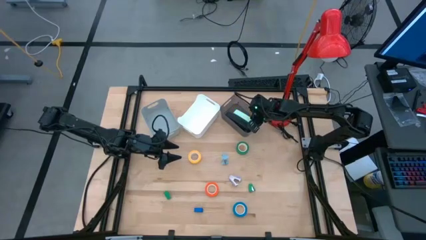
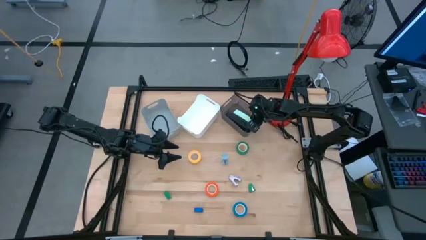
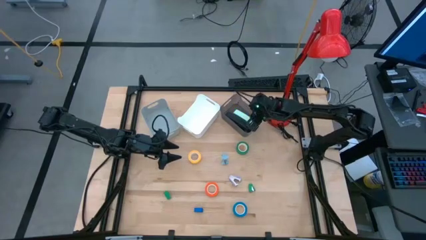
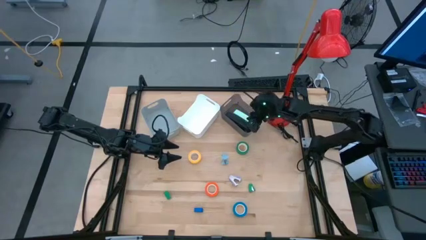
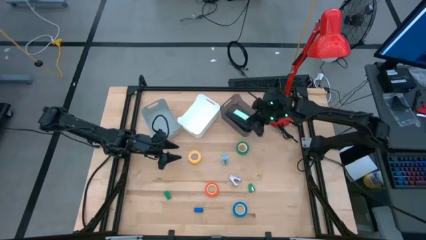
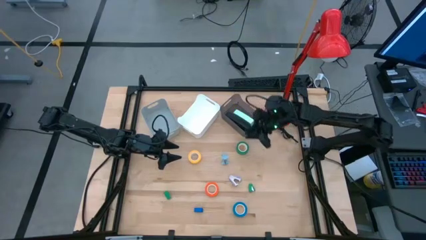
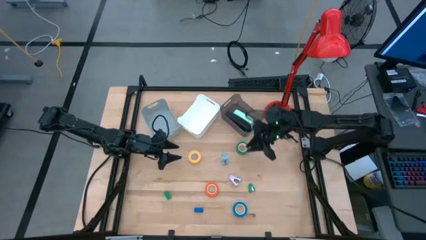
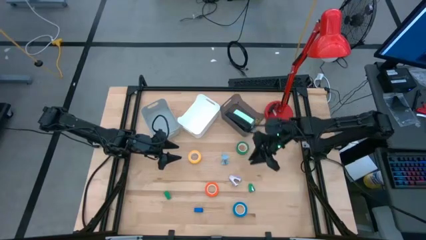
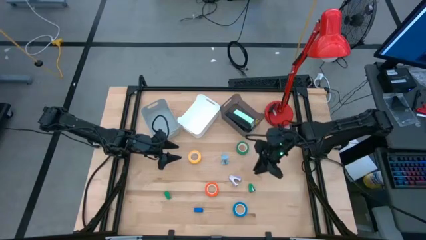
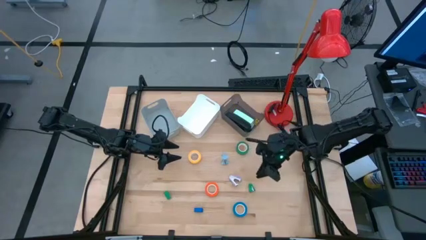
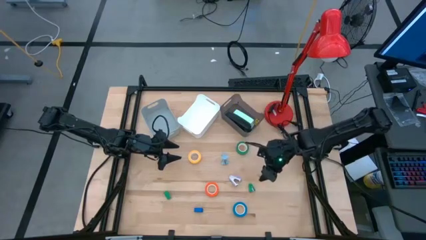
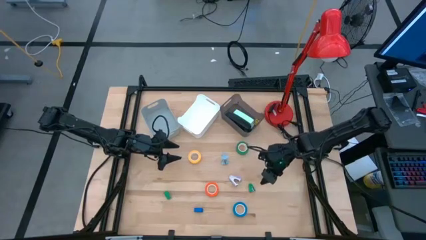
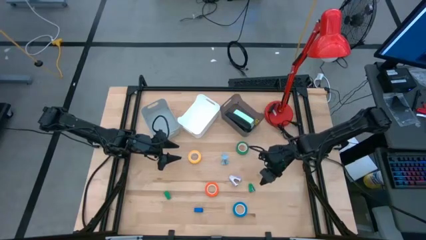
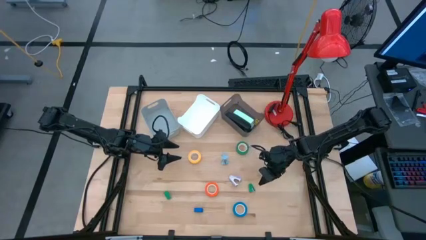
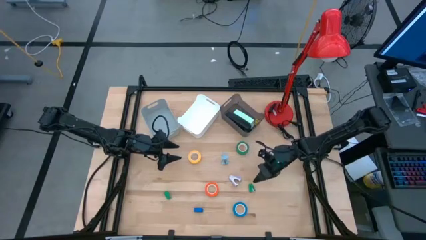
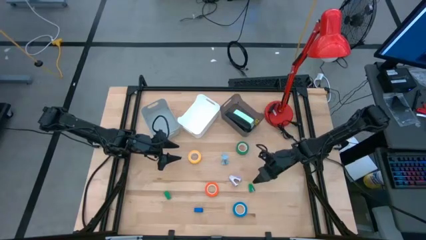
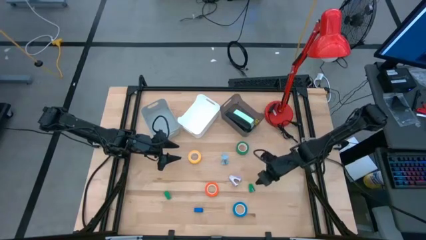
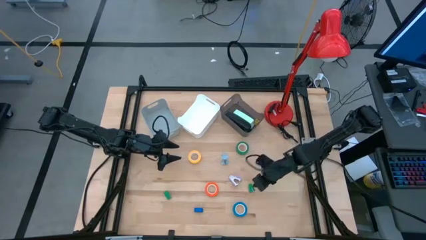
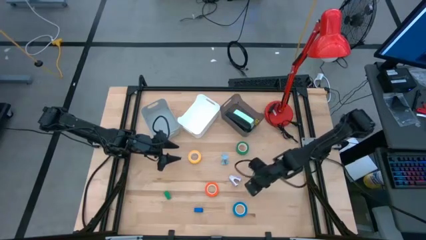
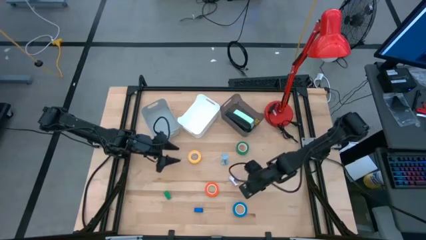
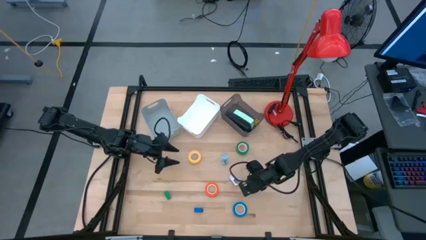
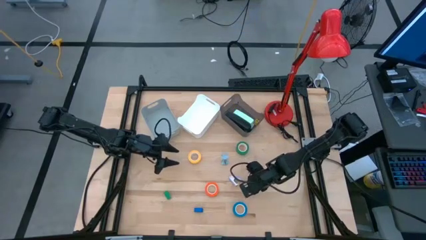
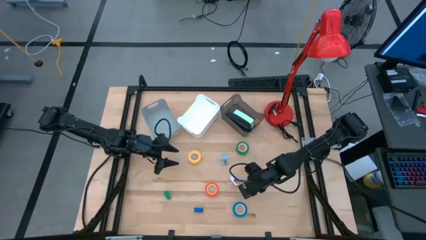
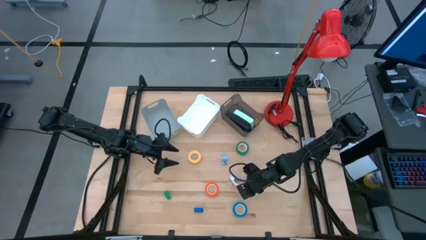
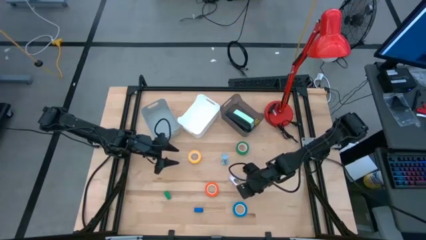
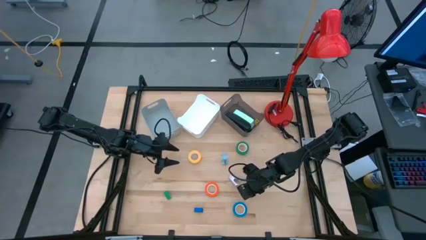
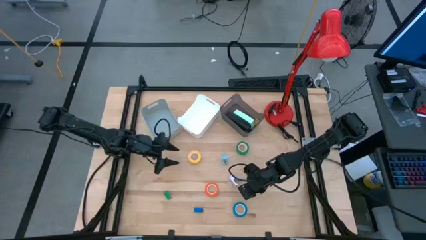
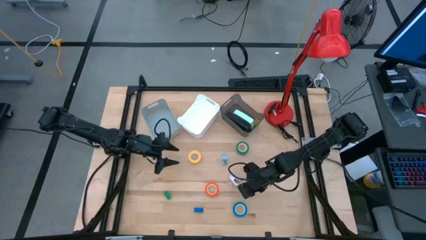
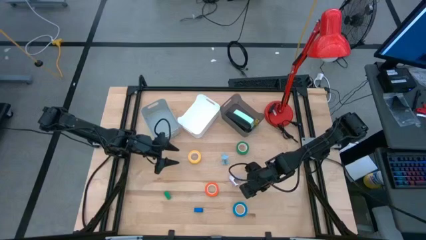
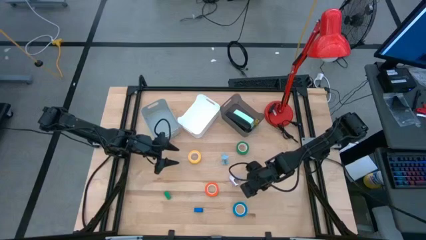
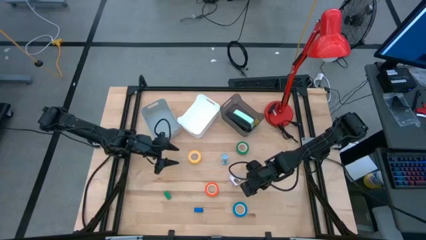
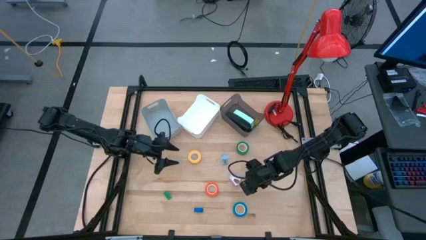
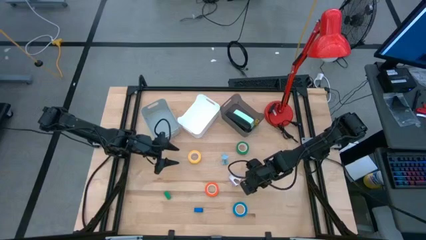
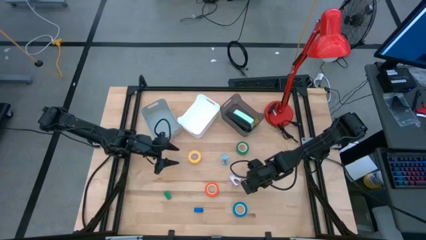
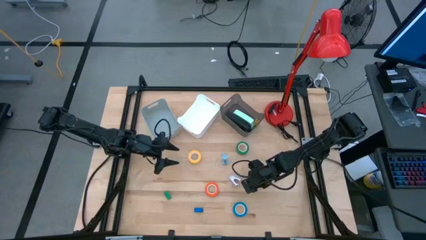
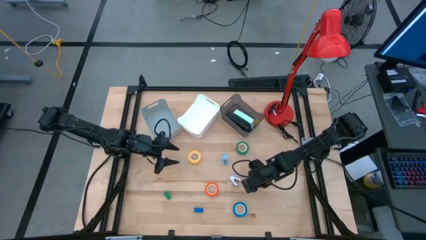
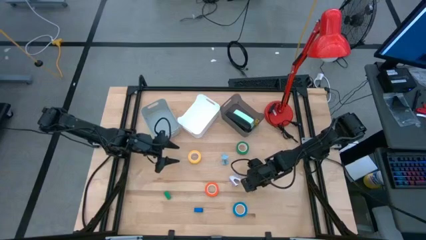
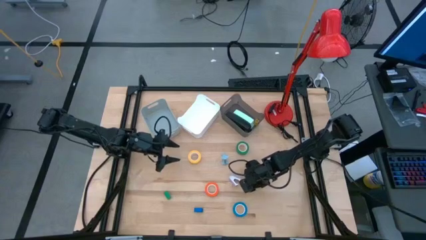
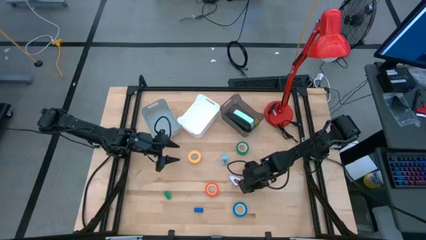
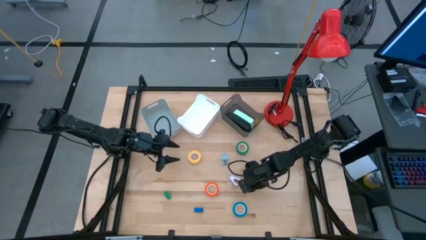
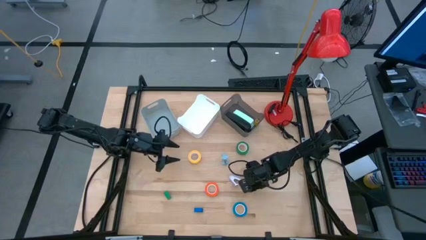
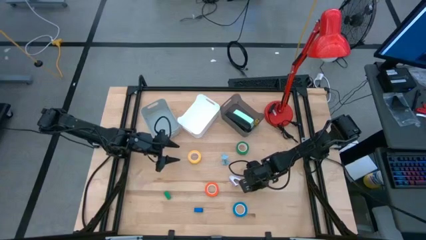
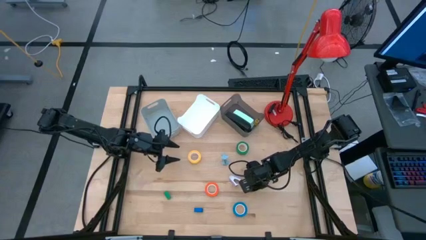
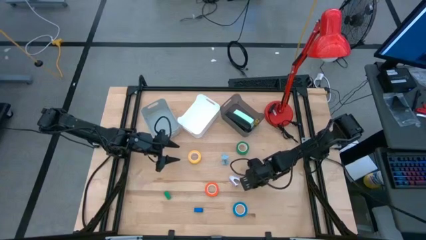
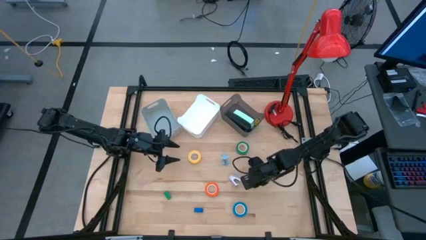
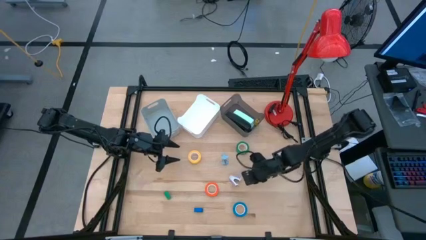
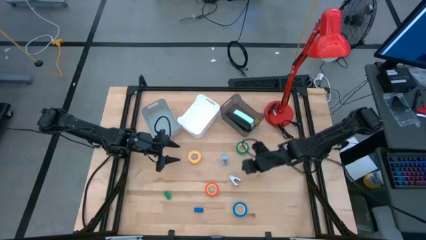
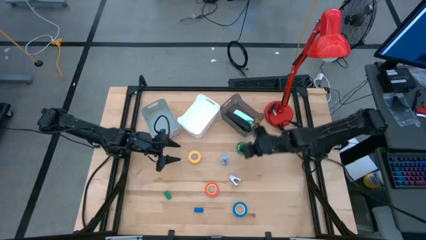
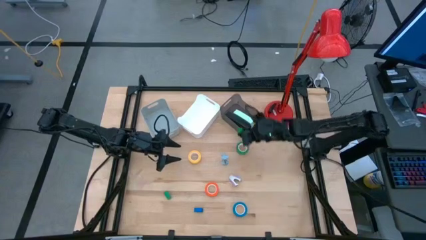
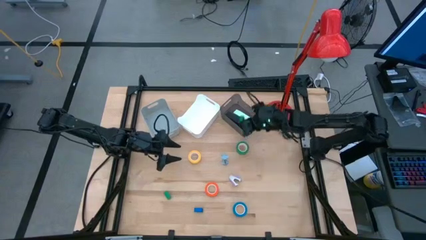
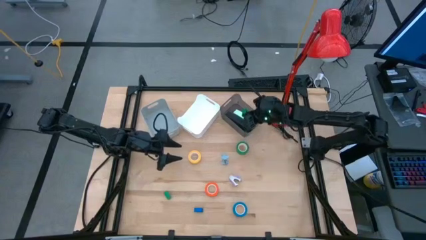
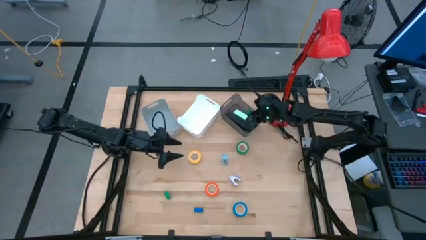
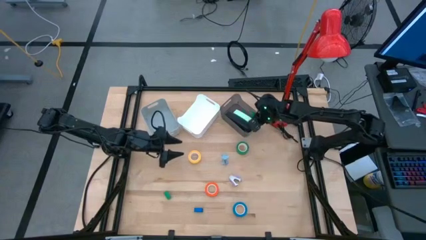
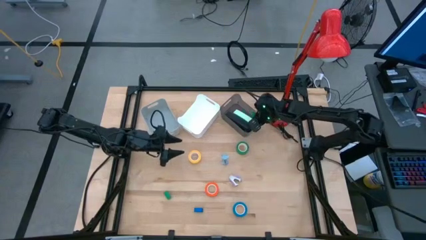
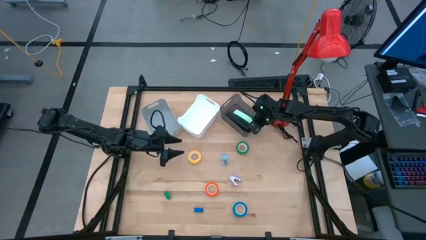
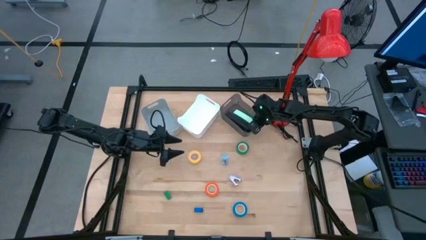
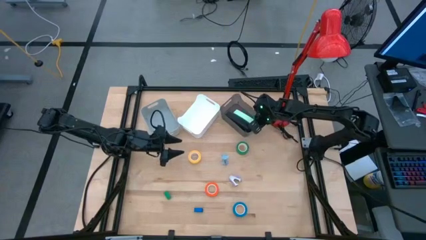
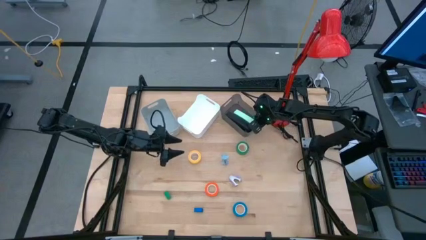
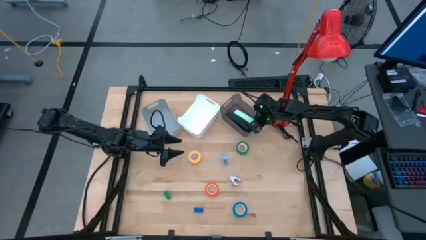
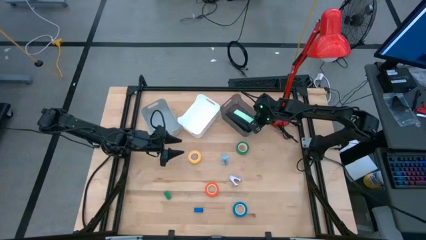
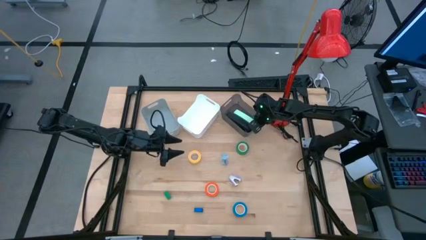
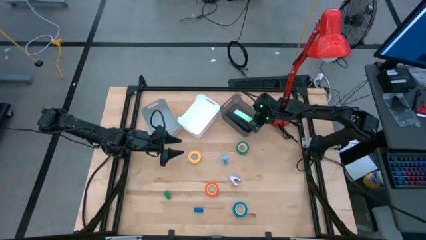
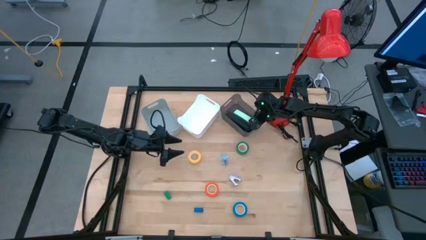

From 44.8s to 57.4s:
Task: Pick and place Stapler, Stapler remover, tape
Put the right small green stapler into the black bin

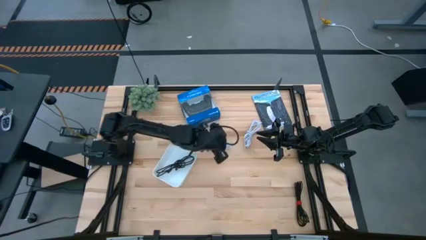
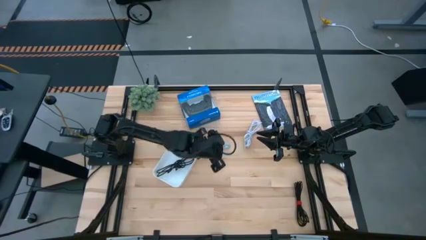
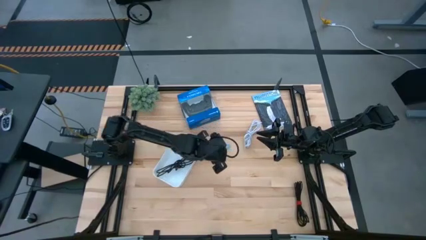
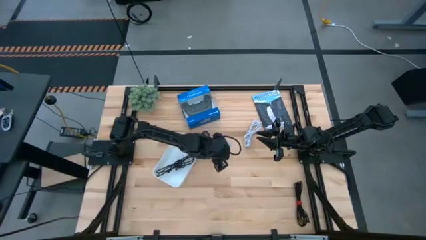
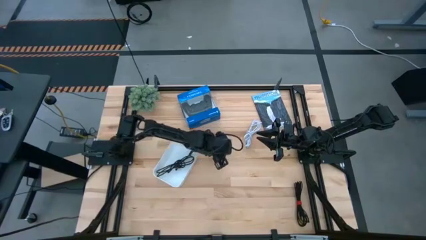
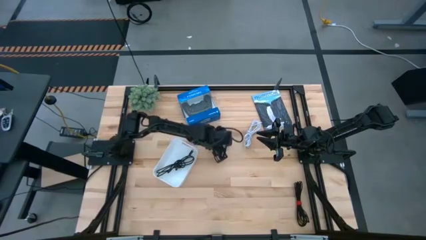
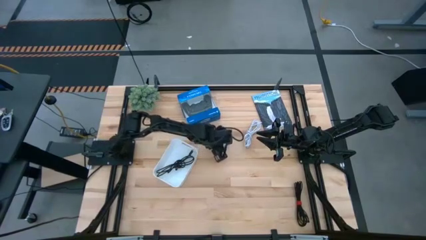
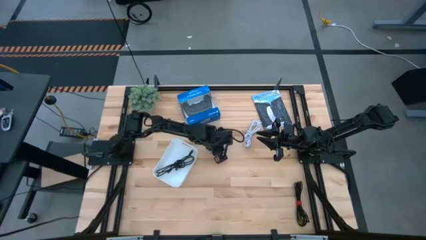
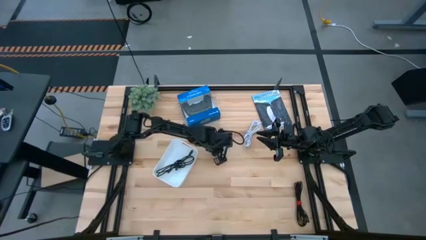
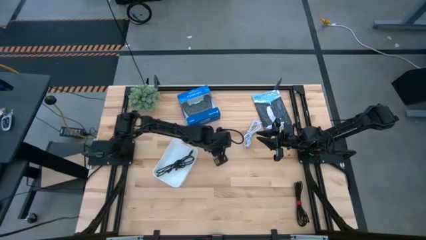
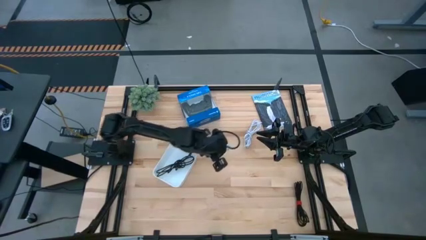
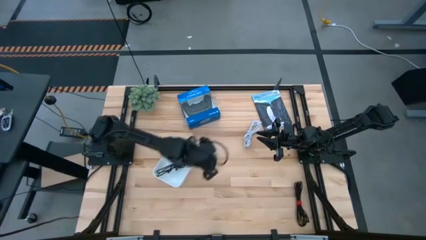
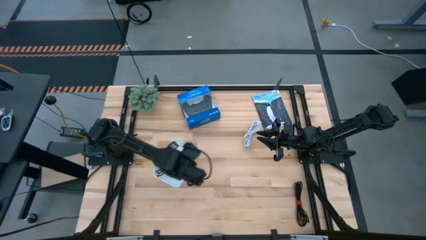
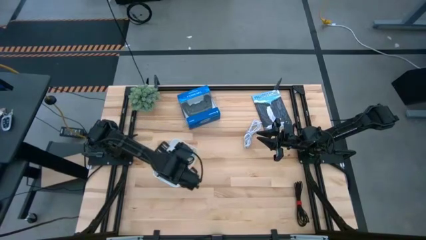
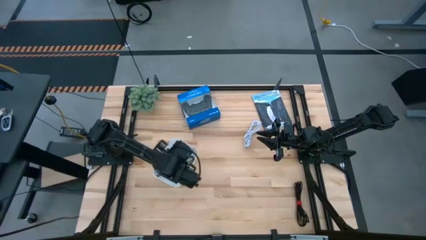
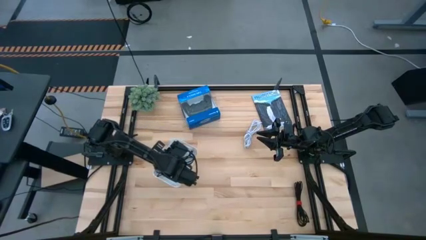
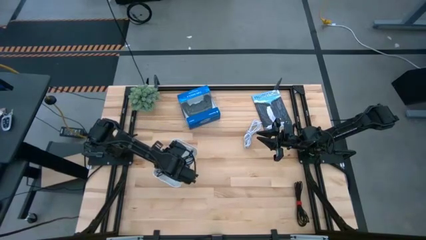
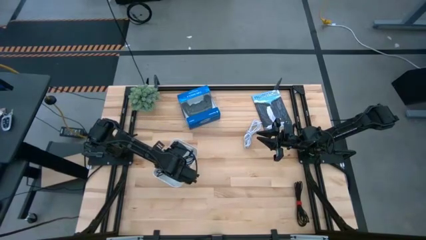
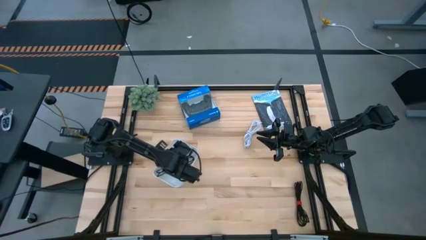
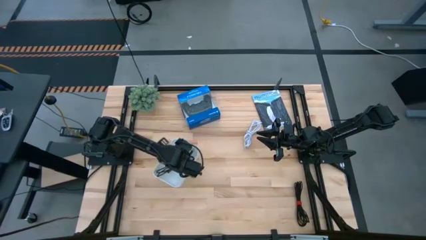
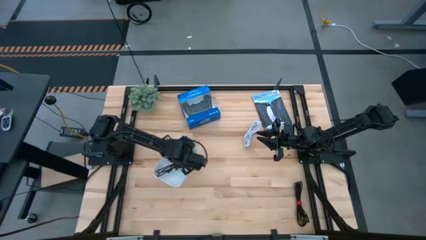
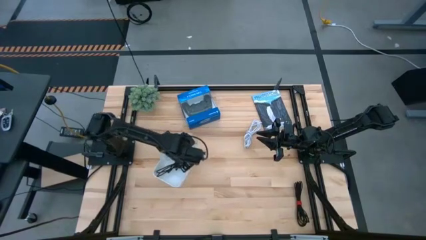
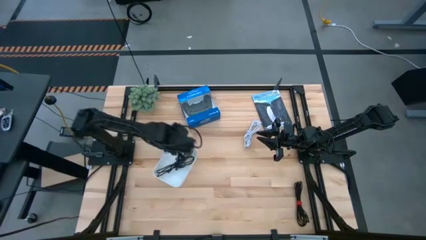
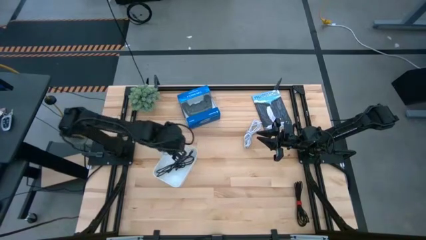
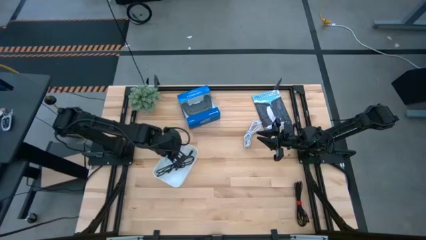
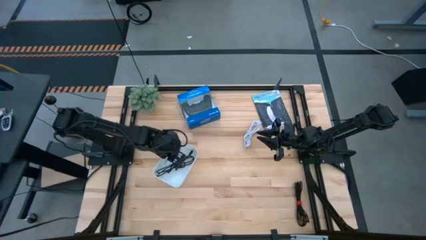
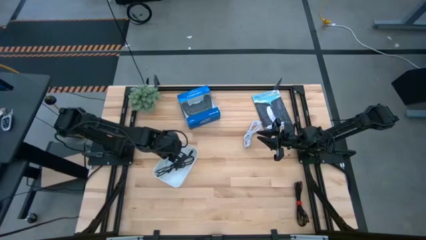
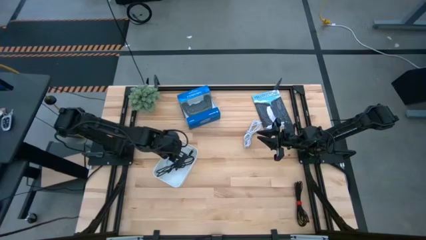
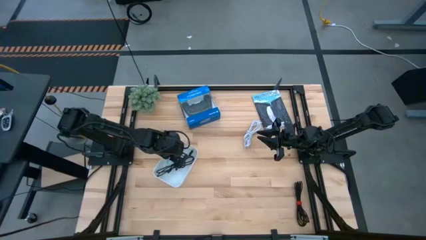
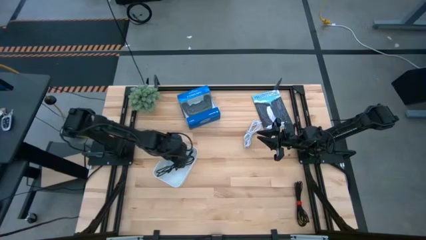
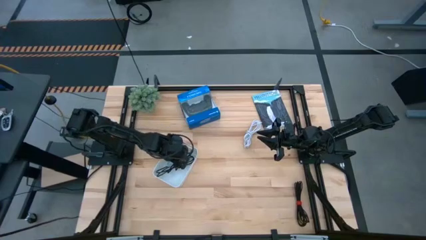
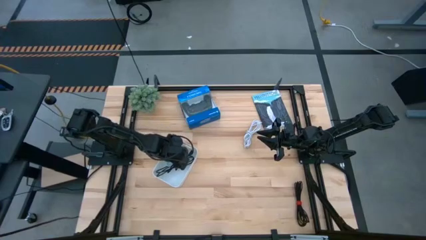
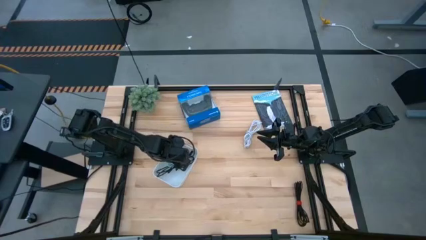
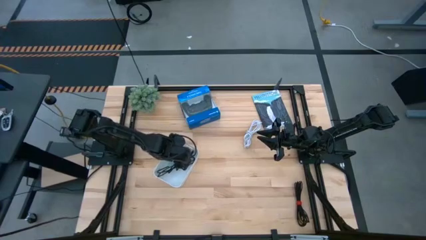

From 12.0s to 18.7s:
Task: Pick and place USB-C Cables
Put the blue charger cable into the white bin
